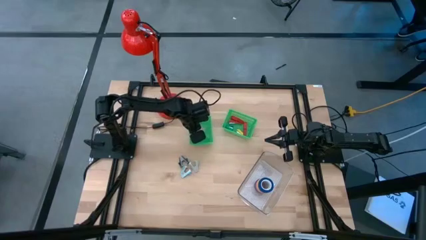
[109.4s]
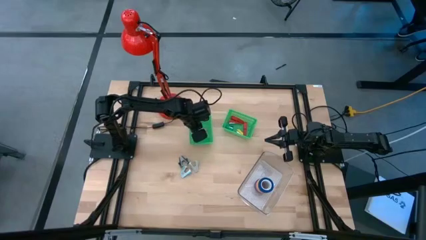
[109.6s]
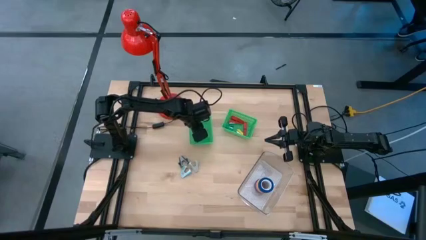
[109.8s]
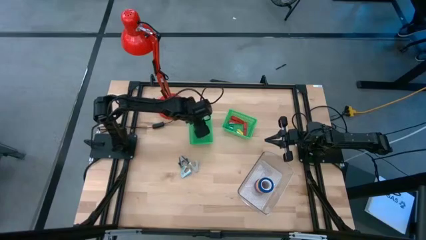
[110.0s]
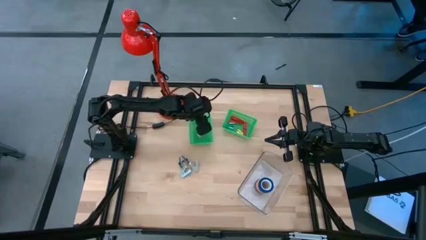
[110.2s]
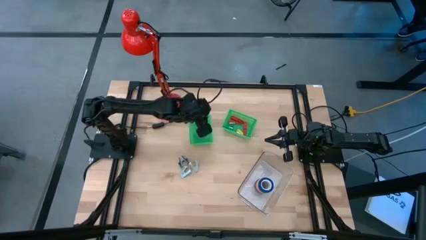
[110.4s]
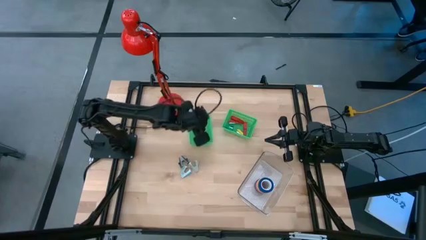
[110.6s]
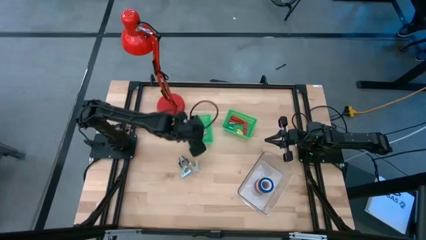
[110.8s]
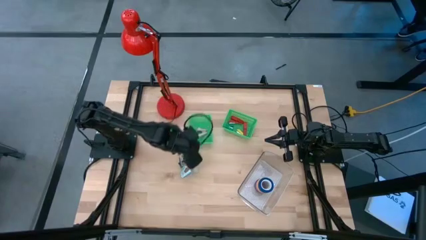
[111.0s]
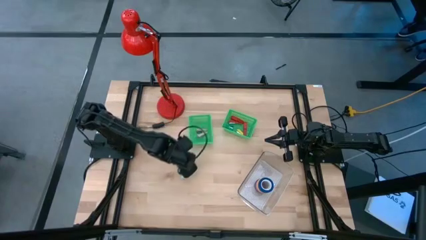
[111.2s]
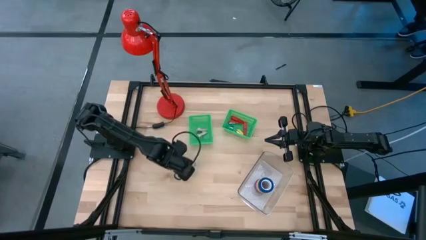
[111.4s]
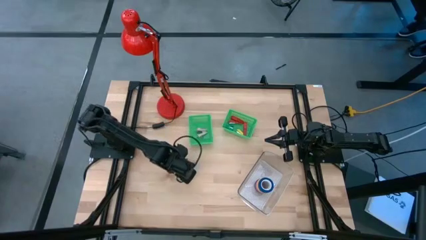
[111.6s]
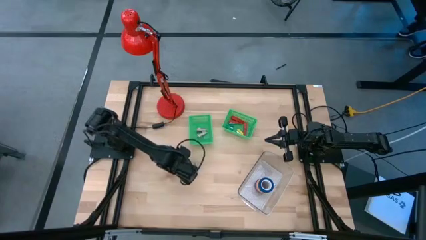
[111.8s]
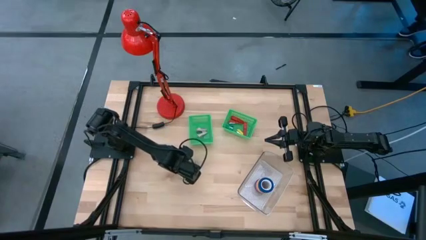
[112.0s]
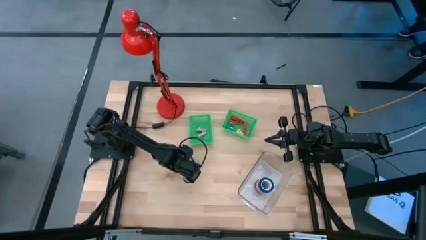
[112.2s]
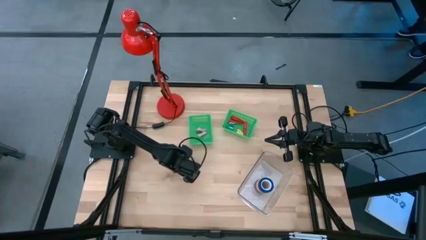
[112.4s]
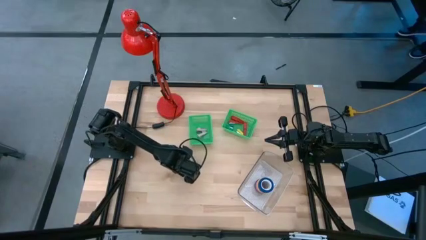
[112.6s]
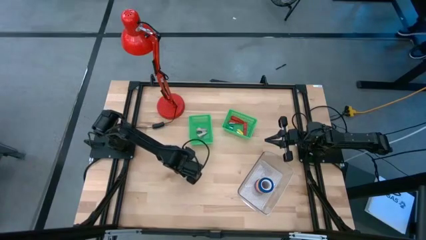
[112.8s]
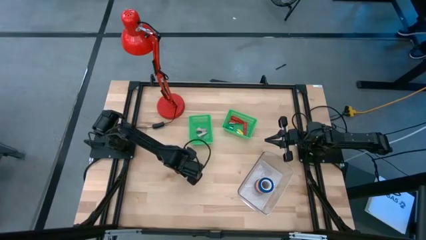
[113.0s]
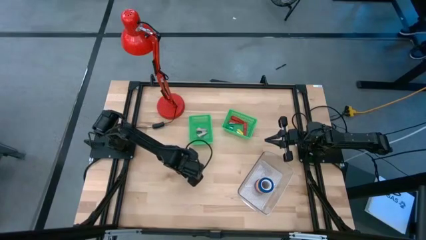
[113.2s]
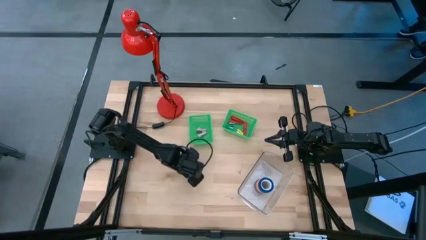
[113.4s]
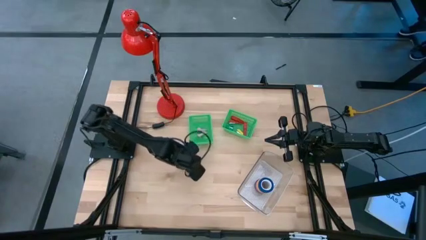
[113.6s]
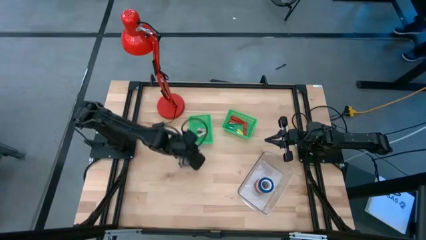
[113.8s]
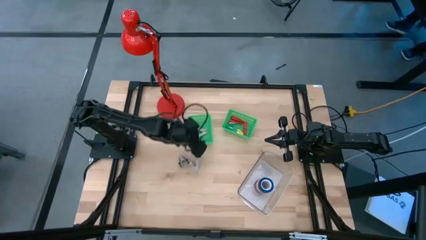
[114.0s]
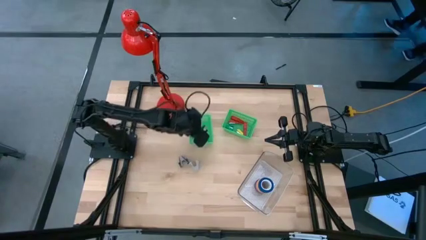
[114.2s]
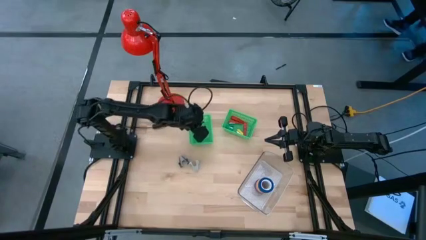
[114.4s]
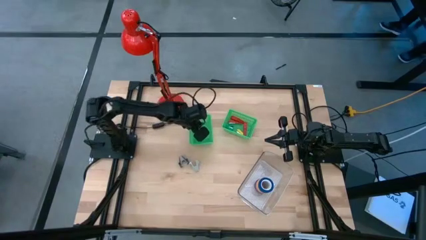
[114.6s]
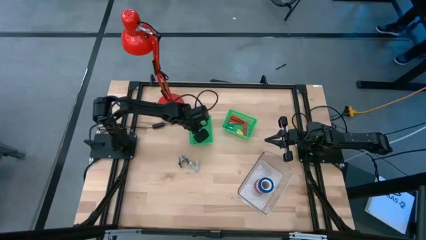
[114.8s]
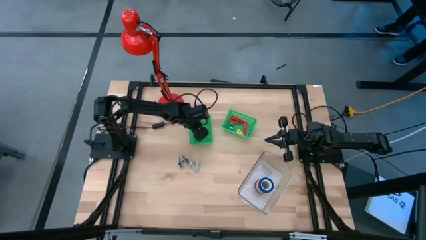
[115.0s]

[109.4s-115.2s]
Task: Pick and place Stapler, Stapler remover, tape
Put the blue staple remover into the left green bin

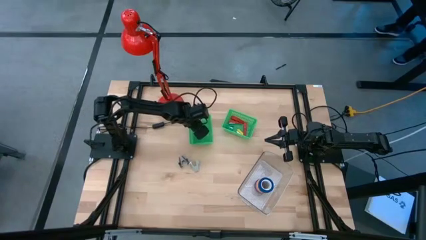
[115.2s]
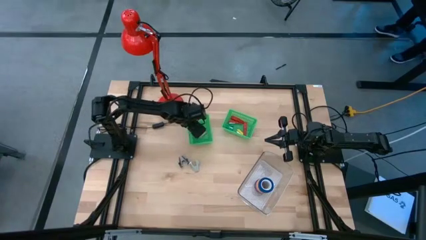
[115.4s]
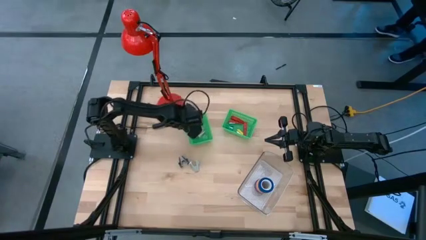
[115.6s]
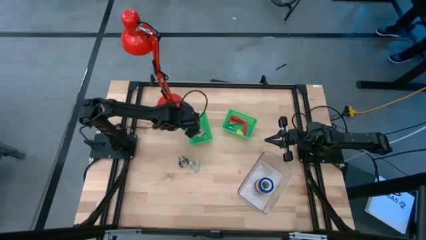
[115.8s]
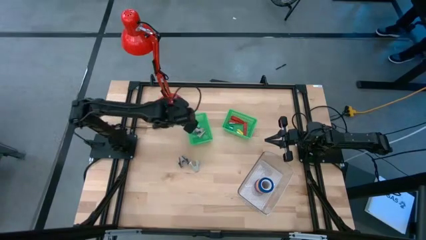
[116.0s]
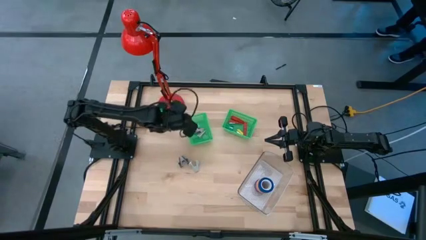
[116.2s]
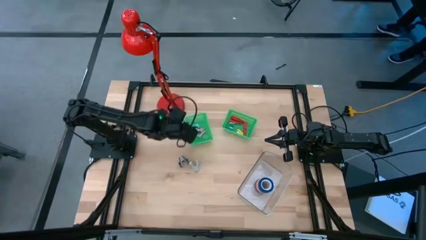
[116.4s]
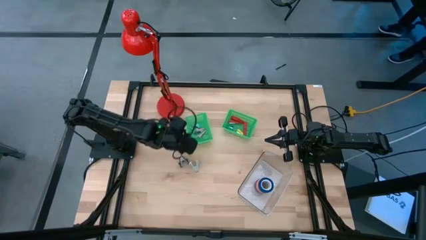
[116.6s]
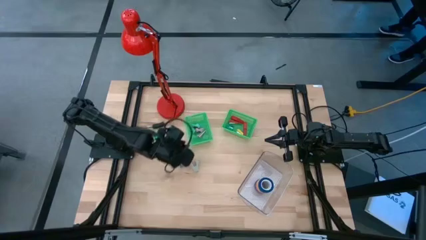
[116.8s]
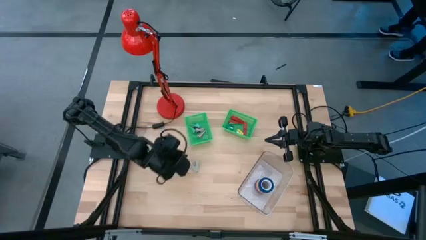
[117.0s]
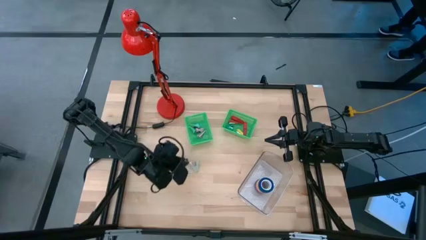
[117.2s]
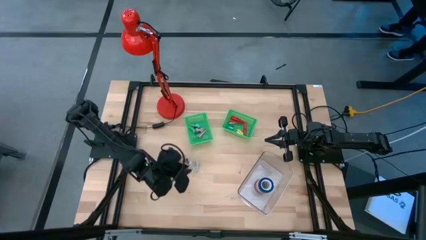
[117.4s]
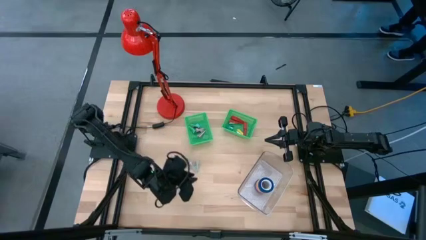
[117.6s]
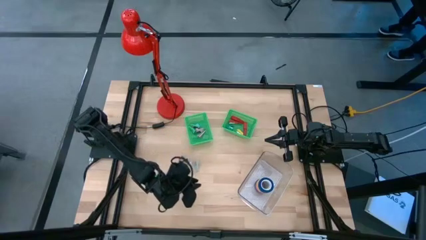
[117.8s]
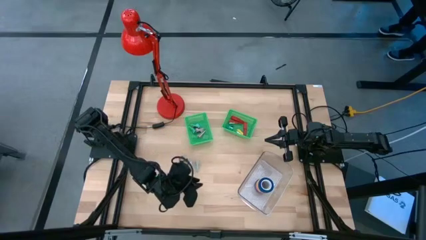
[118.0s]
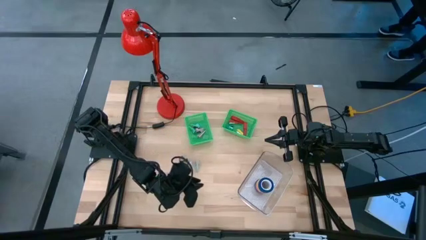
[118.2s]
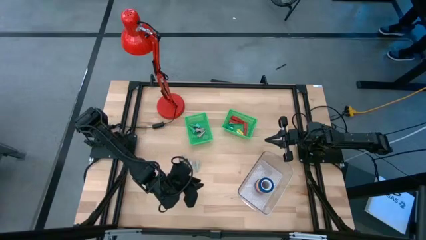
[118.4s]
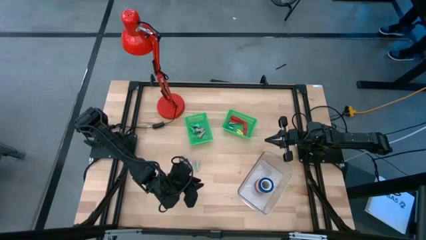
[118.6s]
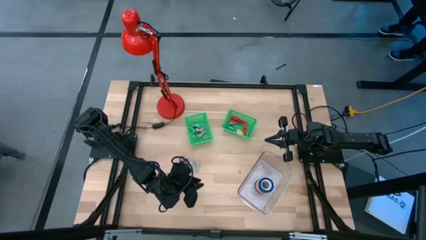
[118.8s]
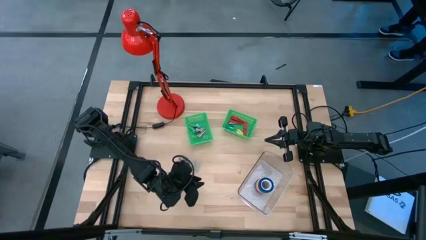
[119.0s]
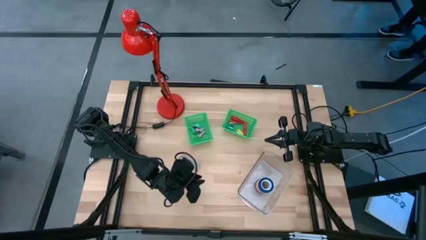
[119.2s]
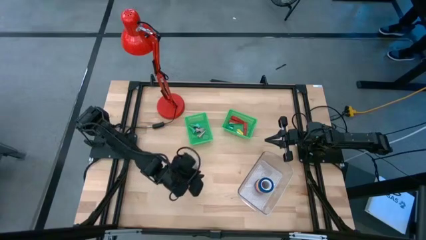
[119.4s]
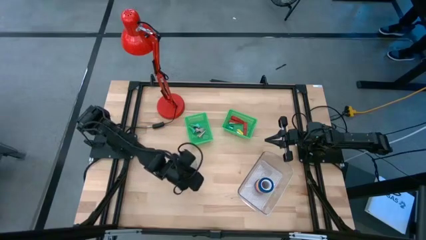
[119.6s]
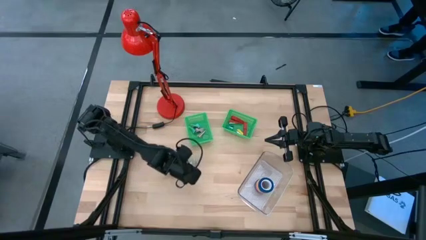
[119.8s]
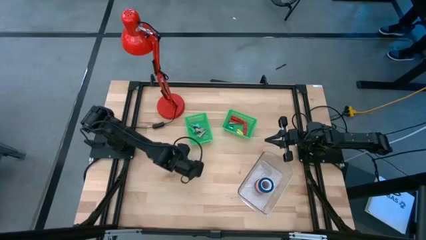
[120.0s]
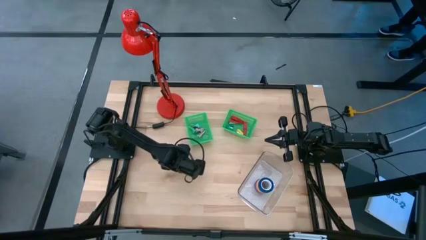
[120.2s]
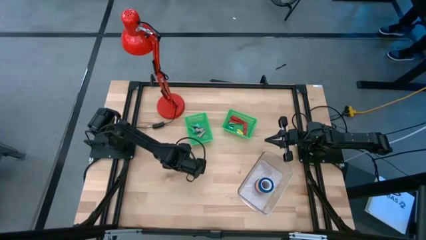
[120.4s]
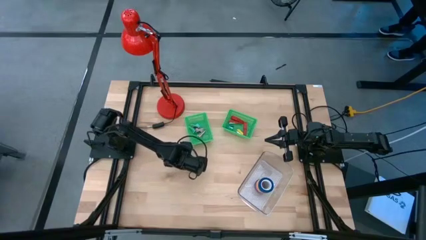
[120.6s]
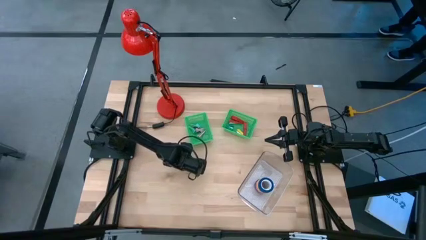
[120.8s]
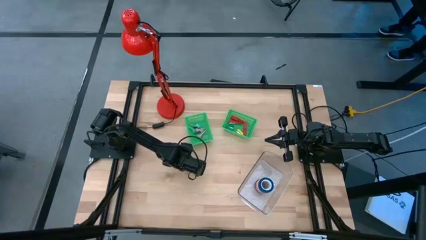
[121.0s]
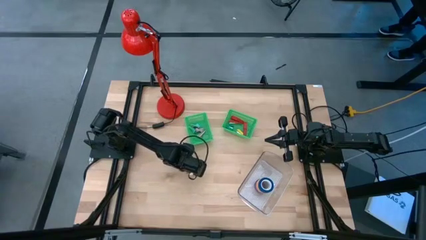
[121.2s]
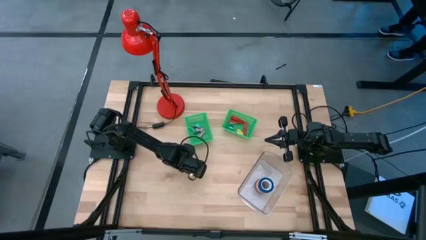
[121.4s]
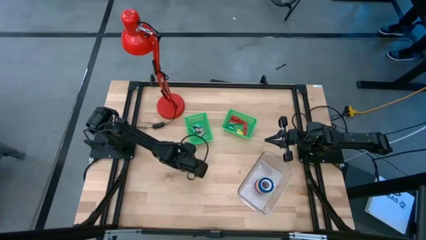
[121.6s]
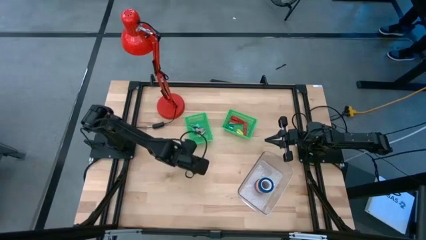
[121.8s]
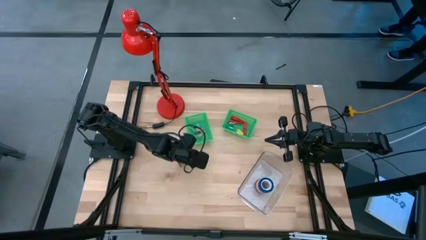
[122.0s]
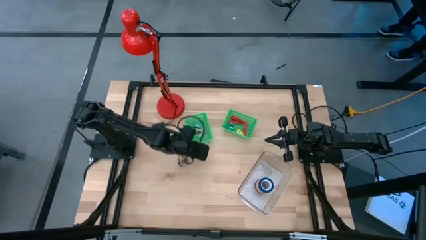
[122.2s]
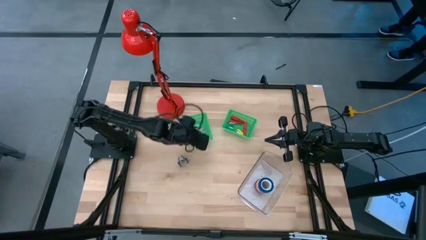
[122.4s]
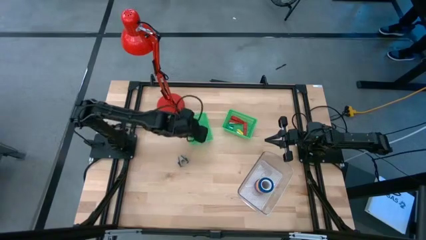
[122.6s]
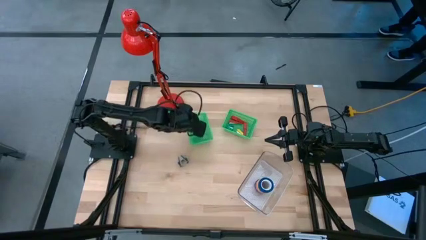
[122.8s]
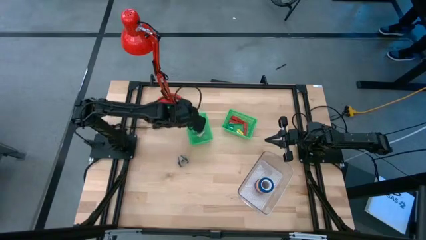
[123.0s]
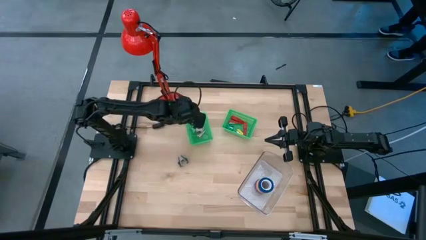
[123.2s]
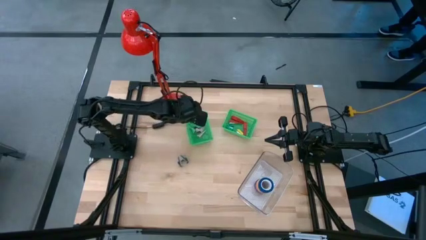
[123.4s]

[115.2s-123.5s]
Put the gray staple remover into the left green bin
